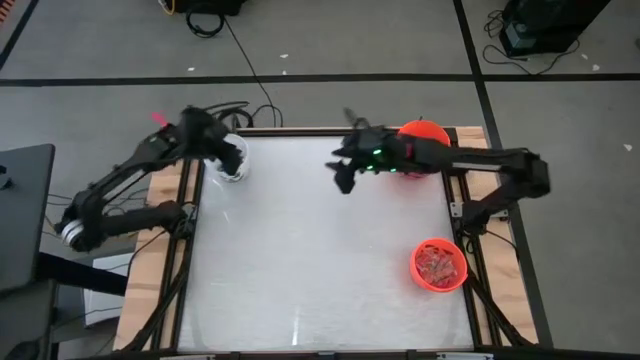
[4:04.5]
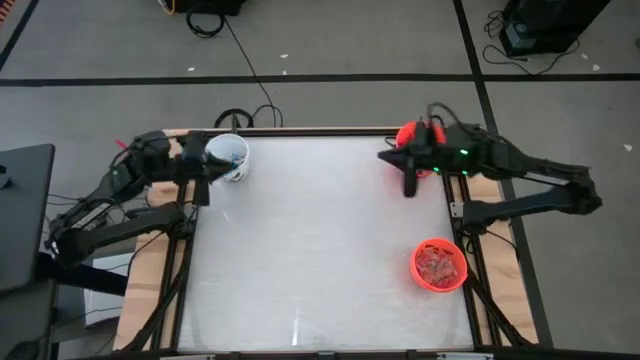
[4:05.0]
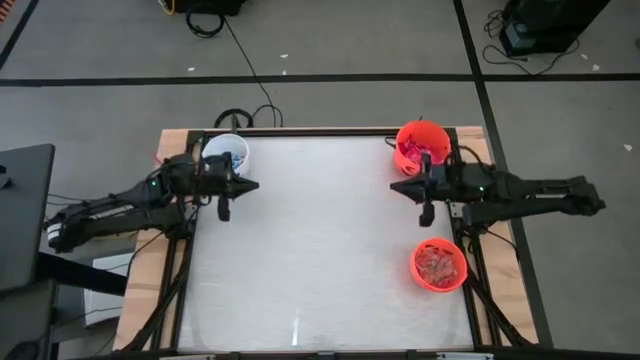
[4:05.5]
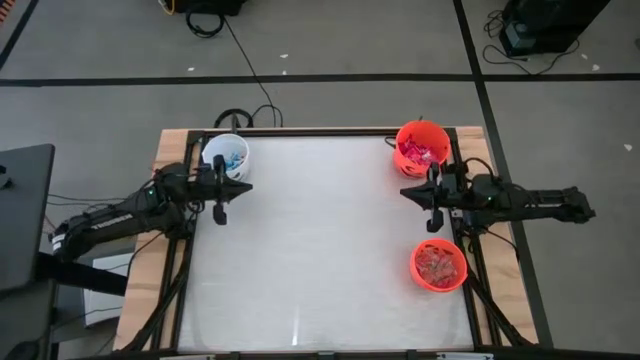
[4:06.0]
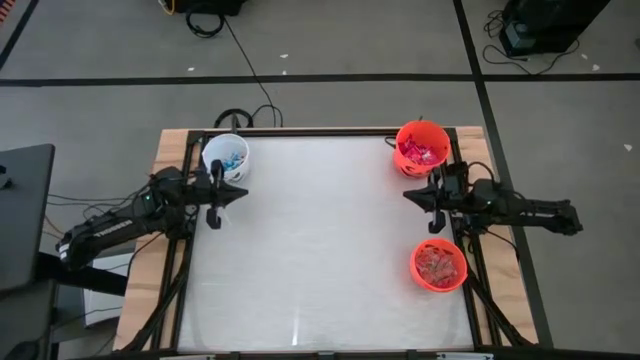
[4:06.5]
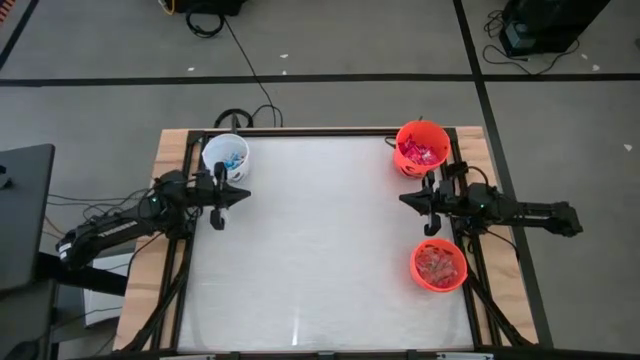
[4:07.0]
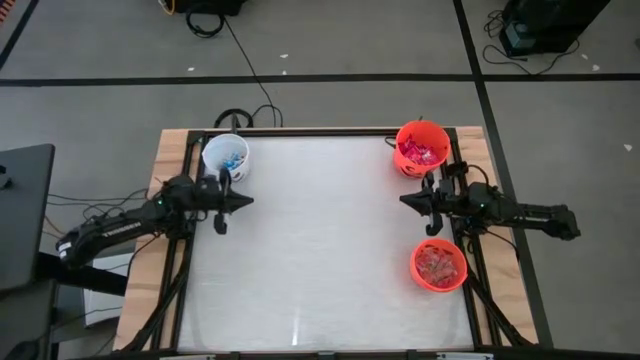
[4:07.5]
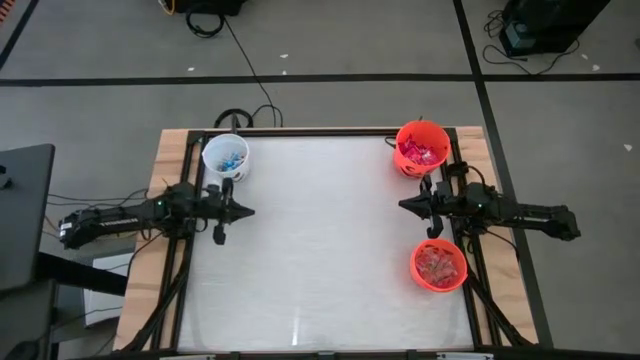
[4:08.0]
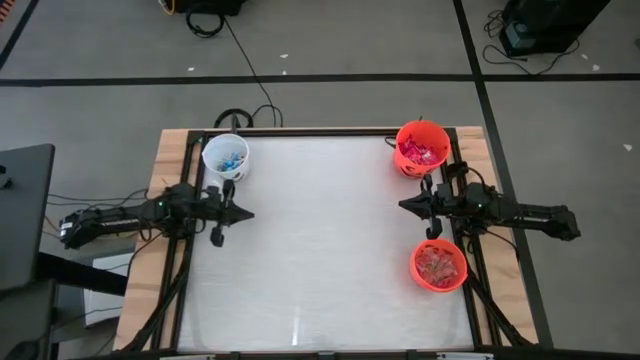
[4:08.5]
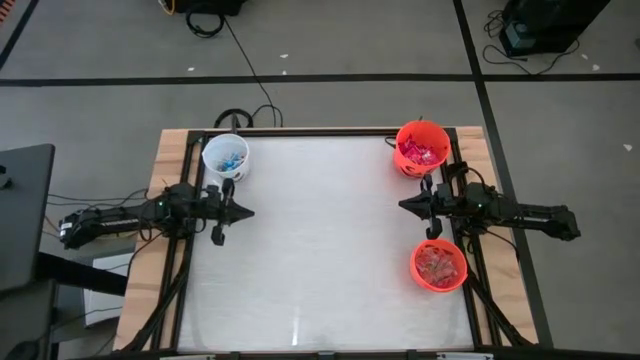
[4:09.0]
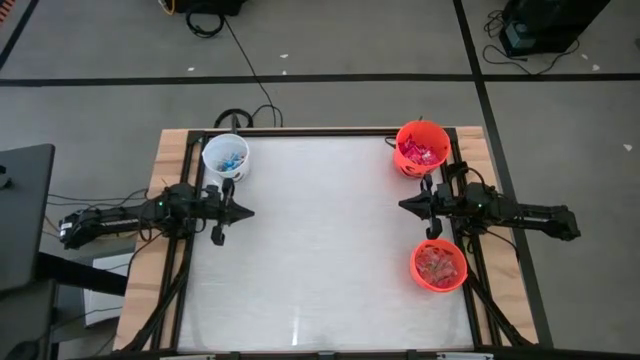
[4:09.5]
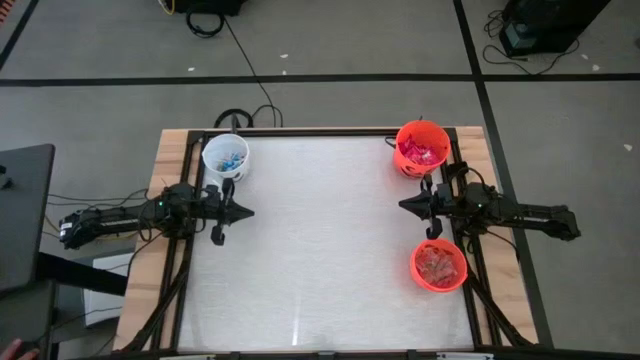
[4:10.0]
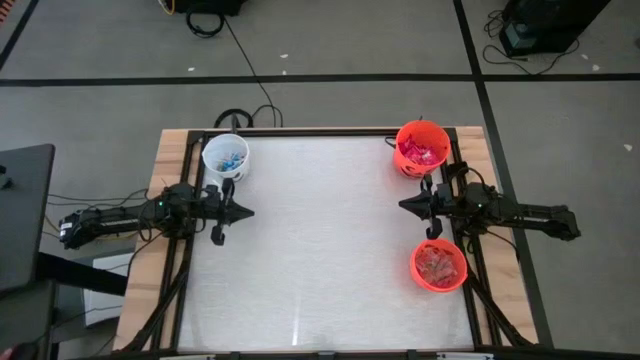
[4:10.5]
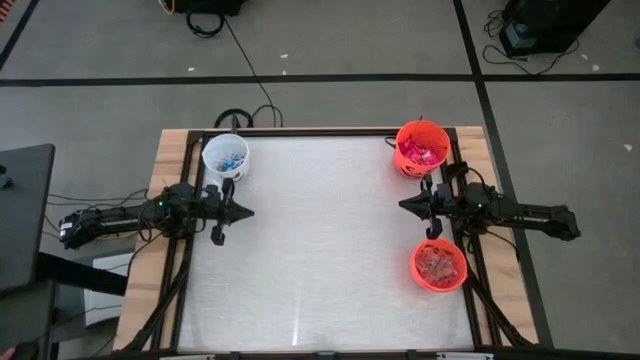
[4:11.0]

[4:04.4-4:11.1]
Task: Sort candy by brand, put in halloween buckets
Return to Home Position

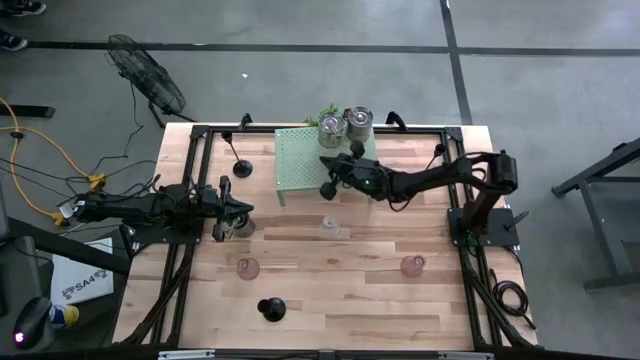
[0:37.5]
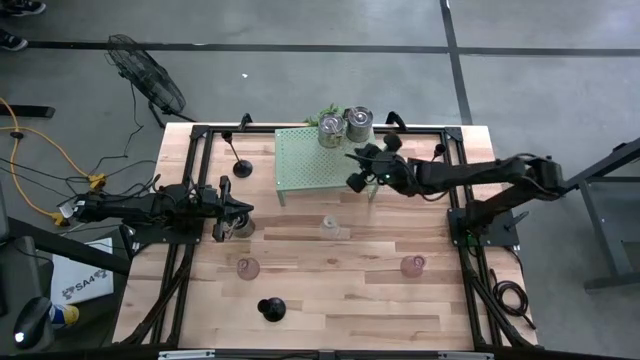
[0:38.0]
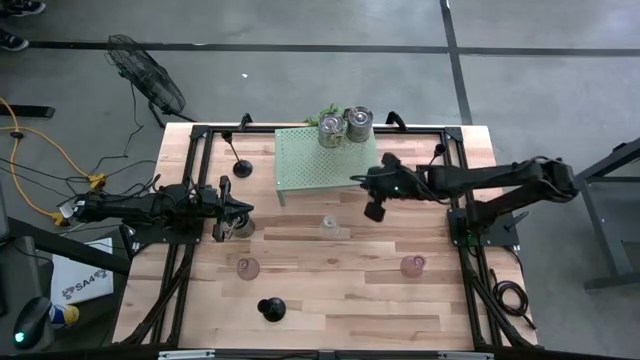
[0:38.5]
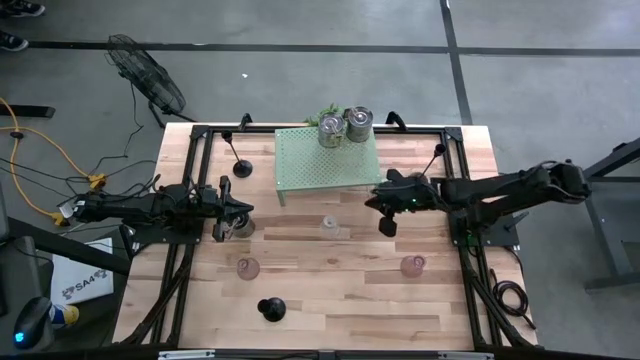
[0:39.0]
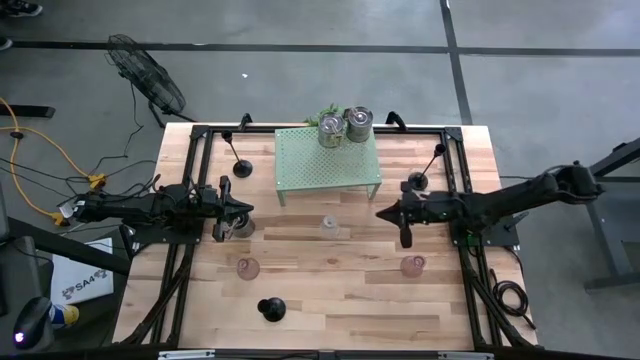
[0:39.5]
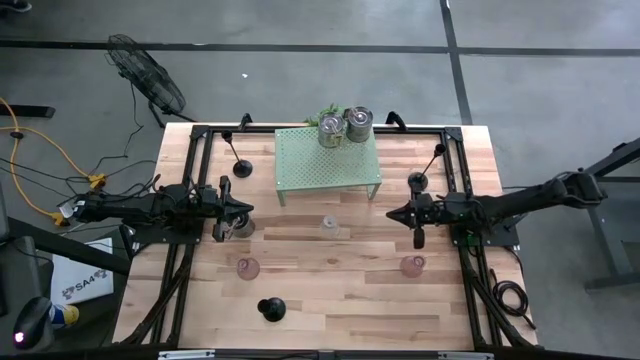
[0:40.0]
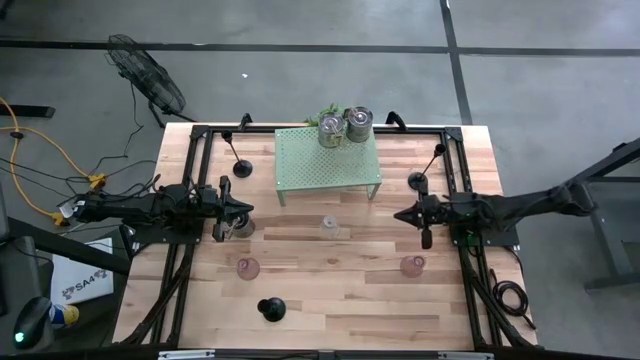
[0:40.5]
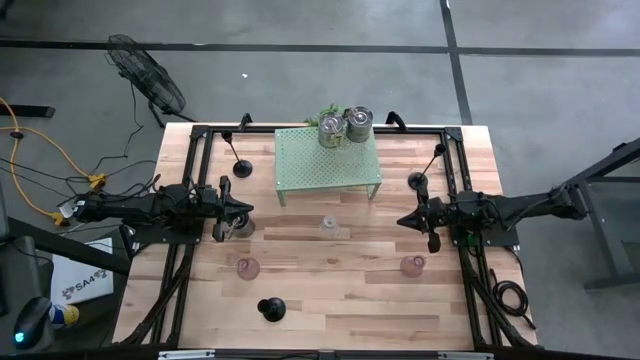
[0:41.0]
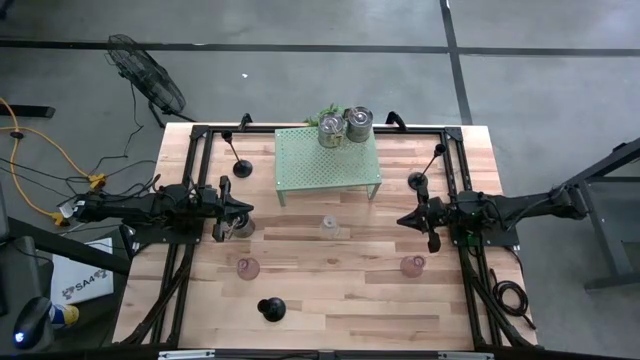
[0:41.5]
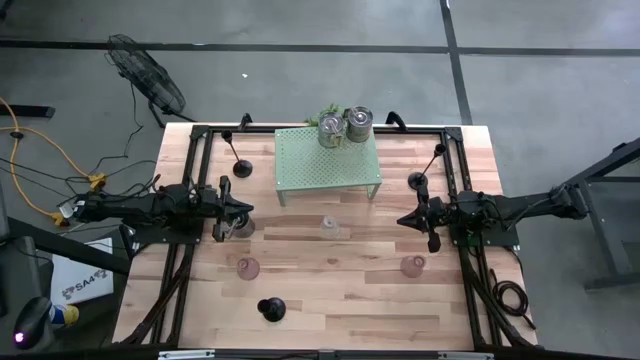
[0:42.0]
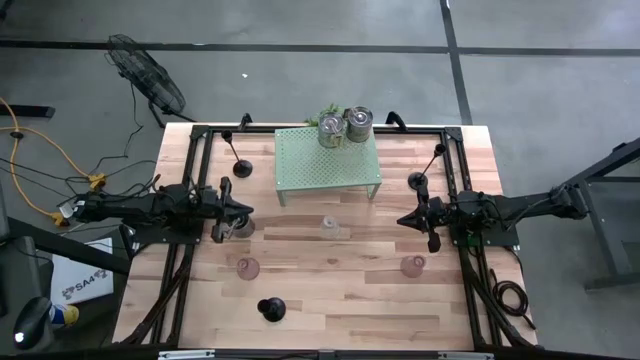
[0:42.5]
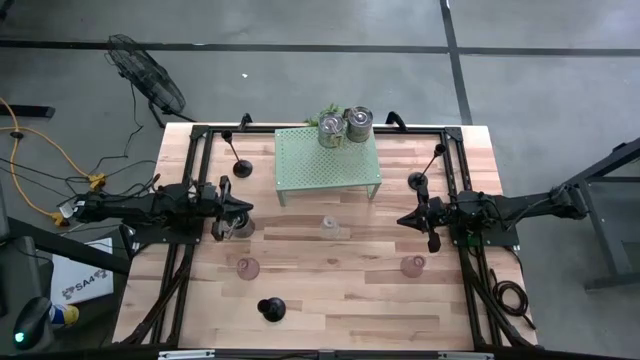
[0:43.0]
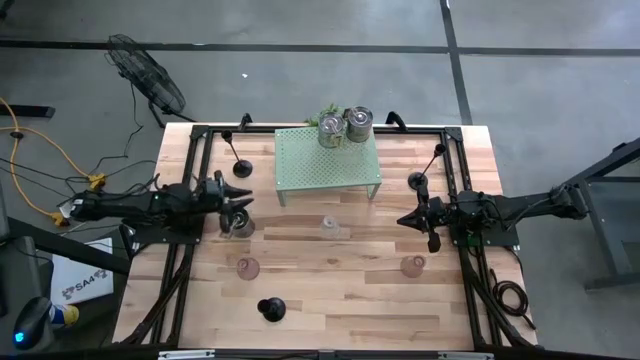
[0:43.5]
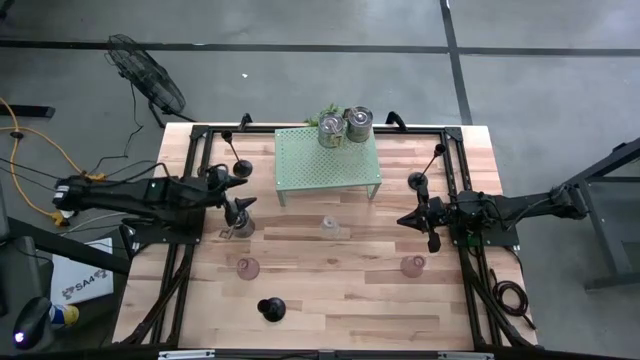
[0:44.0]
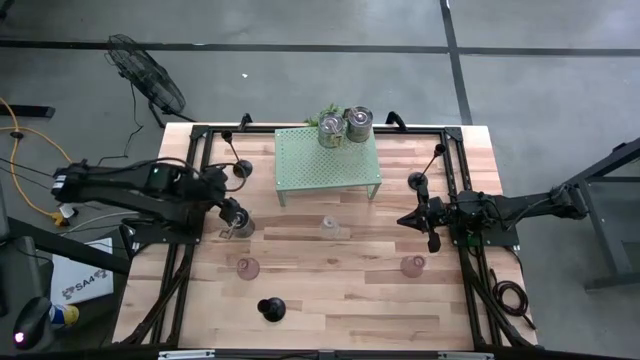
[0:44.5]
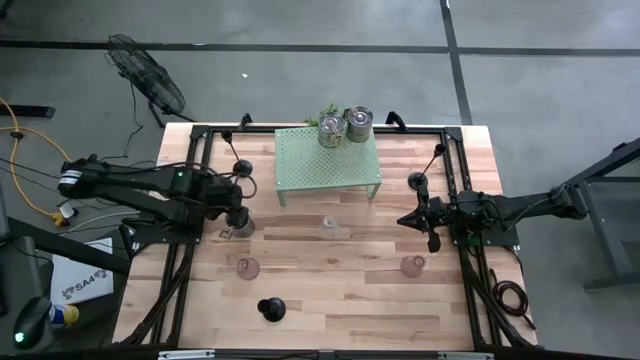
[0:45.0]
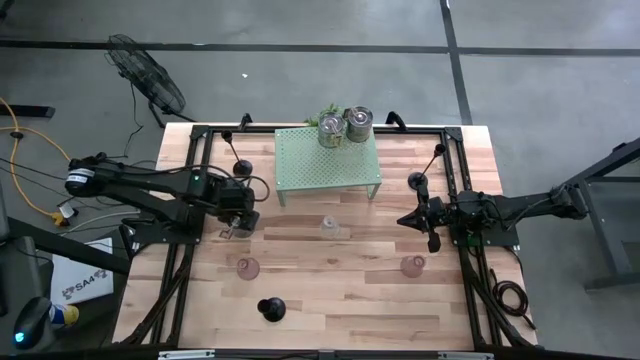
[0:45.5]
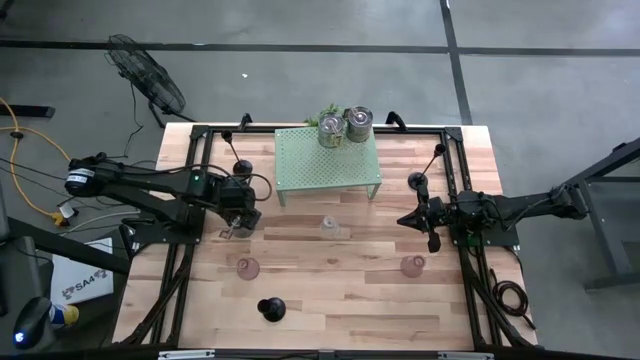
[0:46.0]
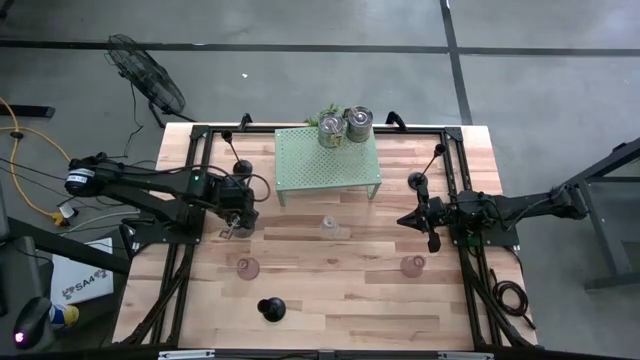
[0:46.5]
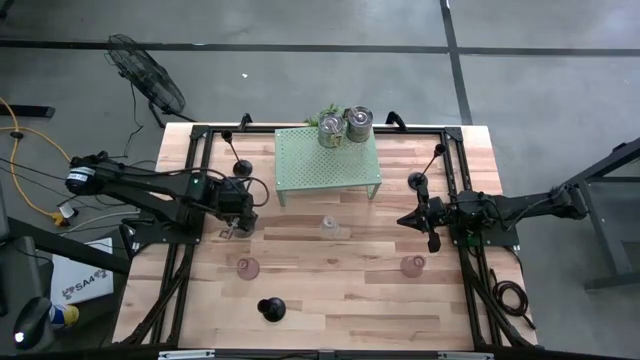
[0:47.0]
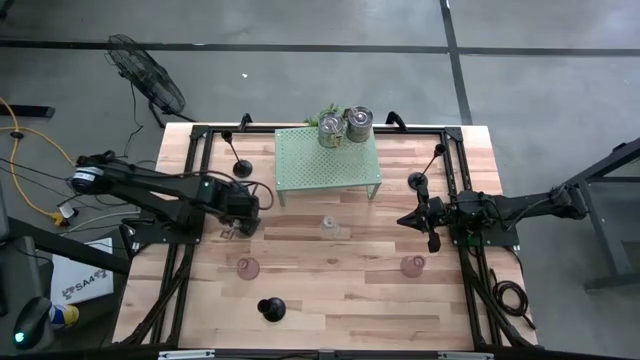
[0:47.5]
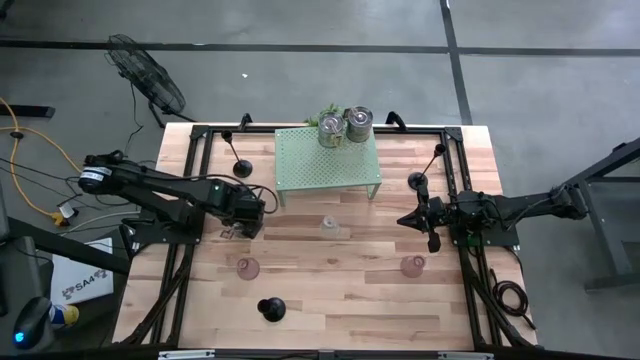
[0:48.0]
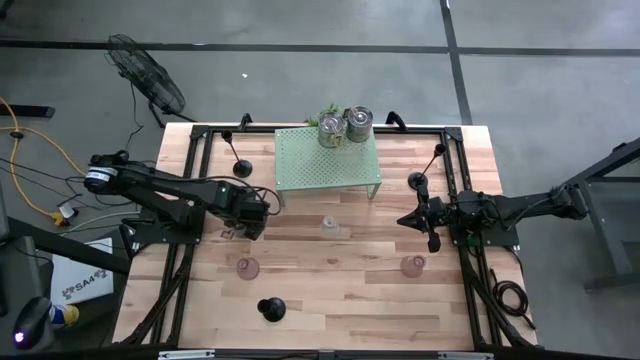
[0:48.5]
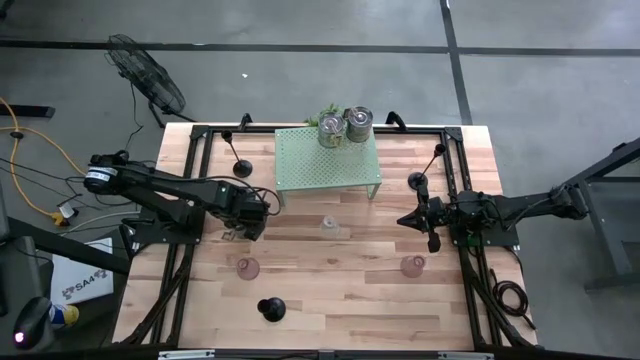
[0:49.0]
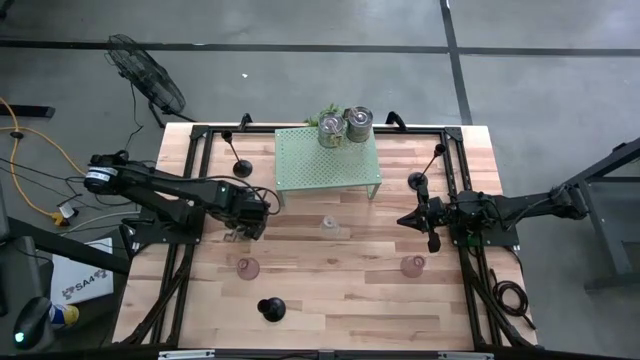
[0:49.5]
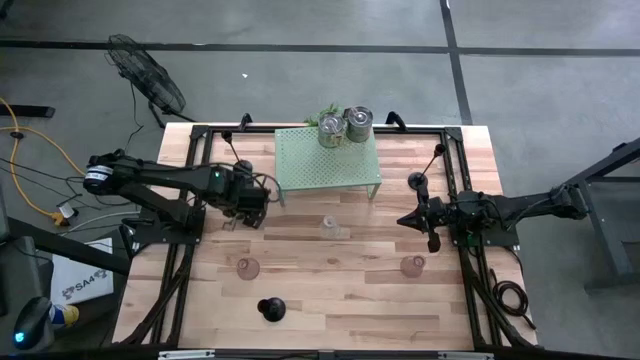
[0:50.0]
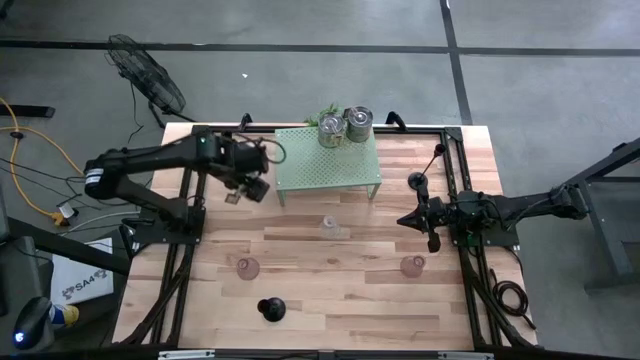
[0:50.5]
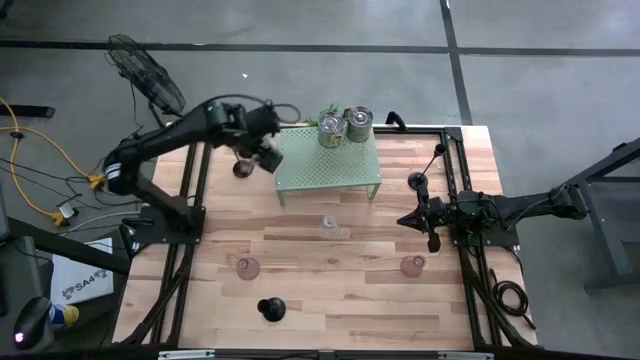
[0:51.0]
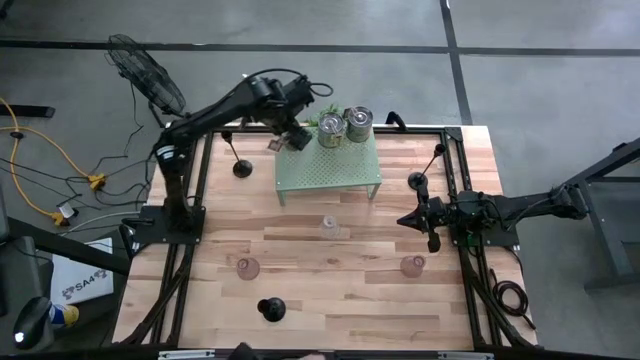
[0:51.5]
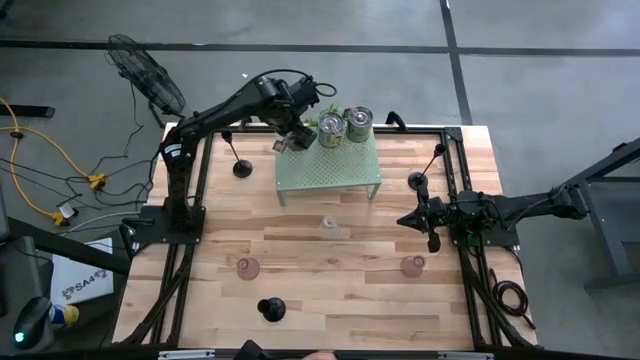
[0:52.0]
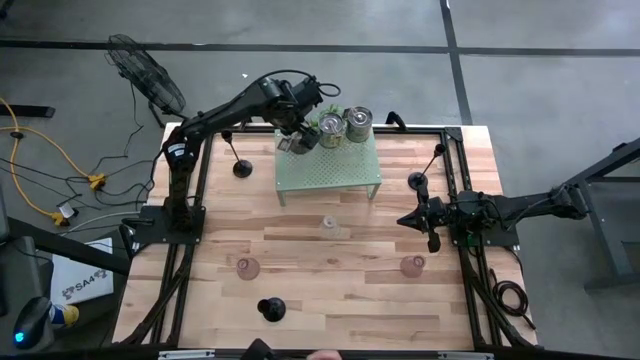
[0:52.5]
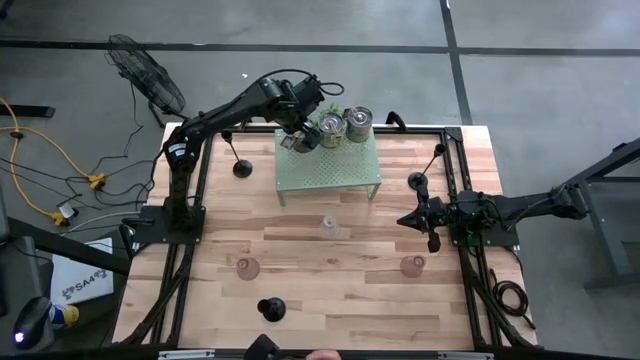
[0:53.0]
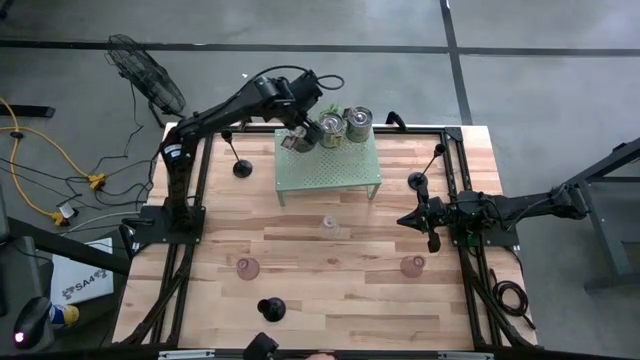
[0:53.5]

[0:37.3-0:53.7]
Task: Pick & Place candle stick holders
Put the silver scented candle on the shelf aligned with the silver scented candles
